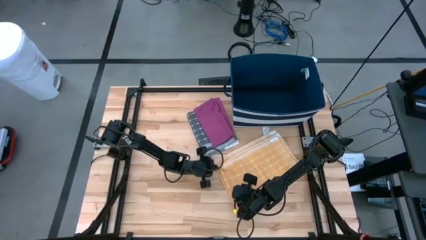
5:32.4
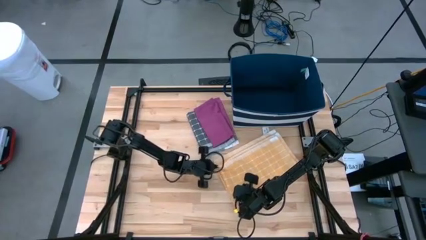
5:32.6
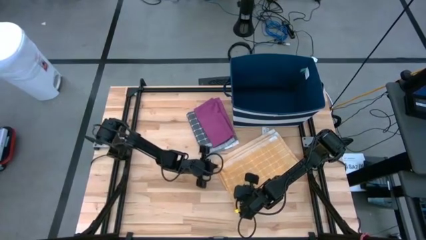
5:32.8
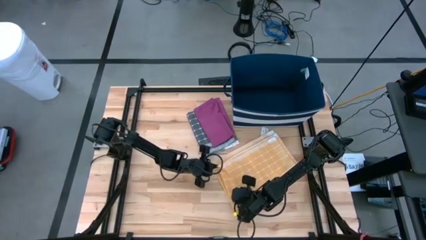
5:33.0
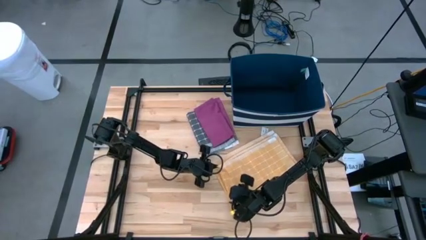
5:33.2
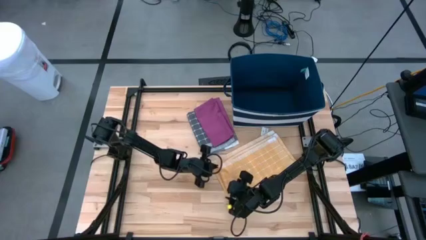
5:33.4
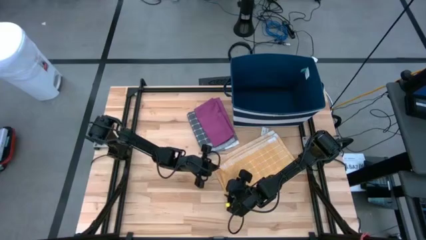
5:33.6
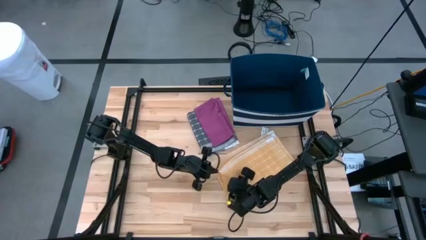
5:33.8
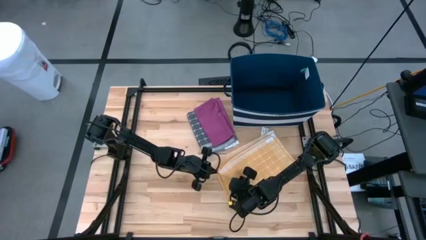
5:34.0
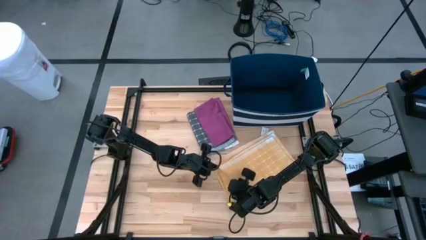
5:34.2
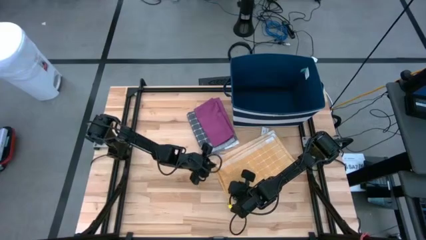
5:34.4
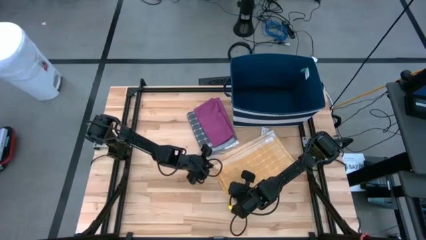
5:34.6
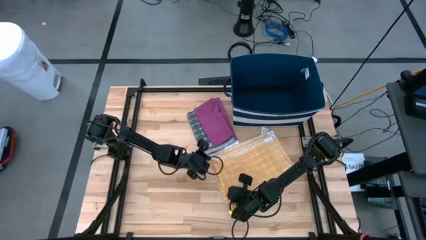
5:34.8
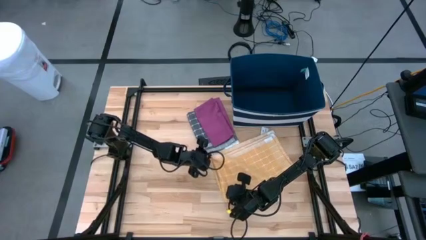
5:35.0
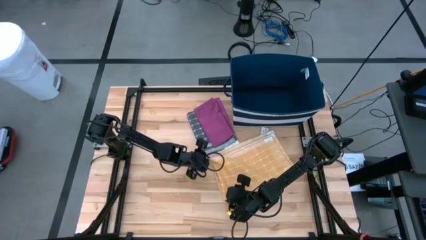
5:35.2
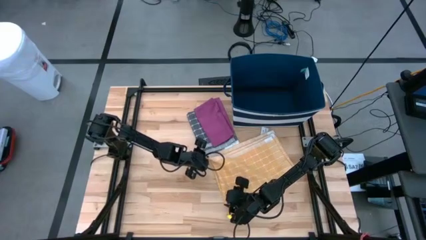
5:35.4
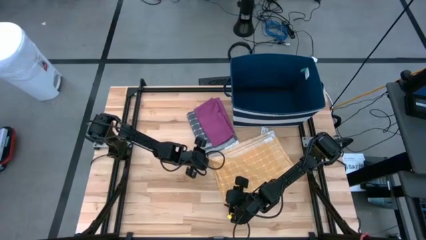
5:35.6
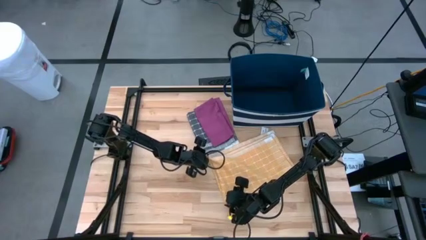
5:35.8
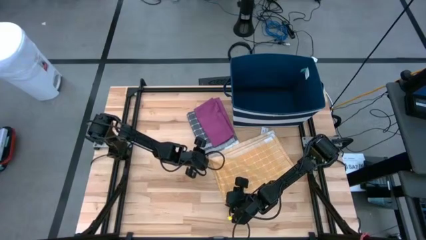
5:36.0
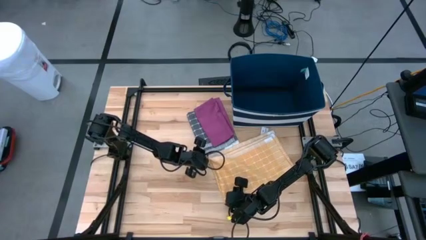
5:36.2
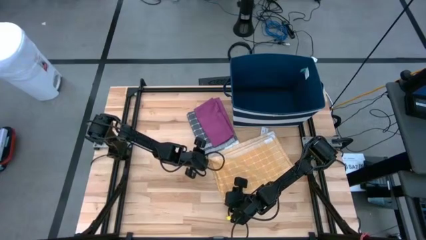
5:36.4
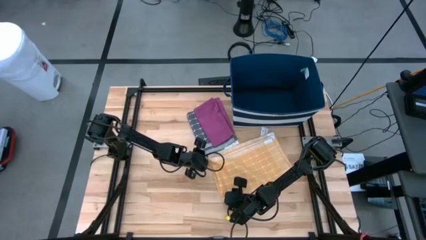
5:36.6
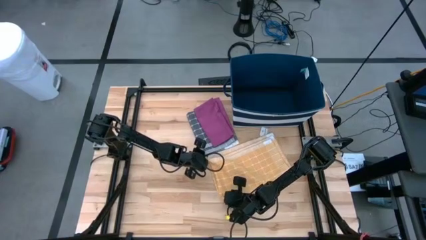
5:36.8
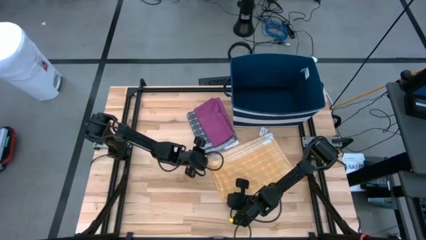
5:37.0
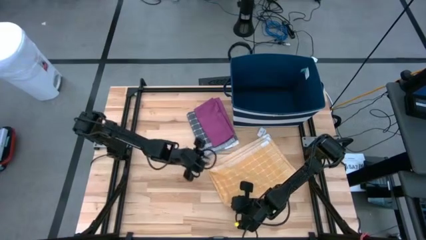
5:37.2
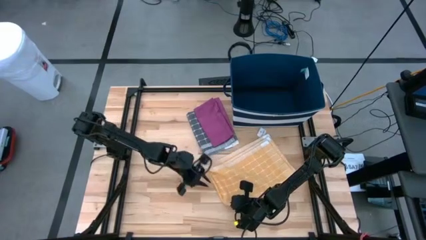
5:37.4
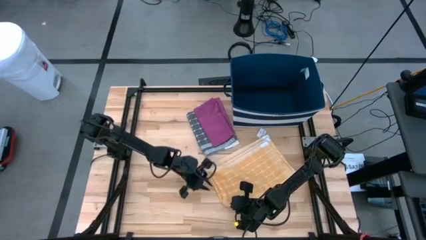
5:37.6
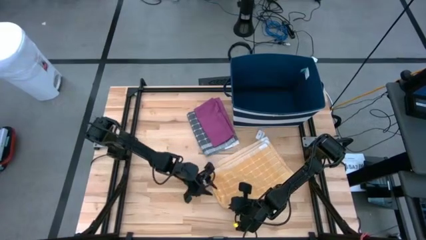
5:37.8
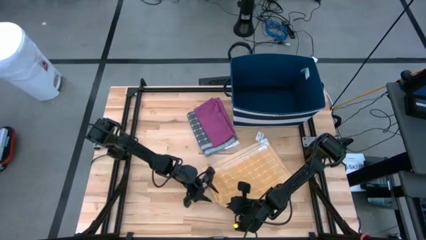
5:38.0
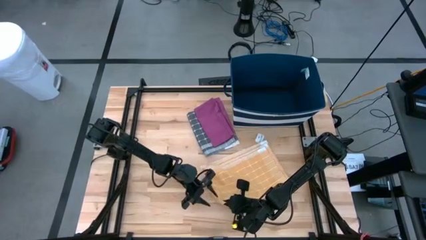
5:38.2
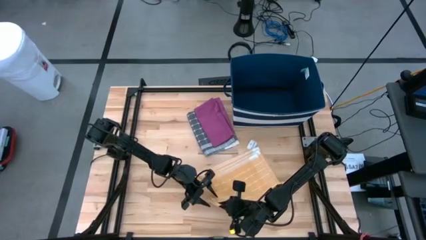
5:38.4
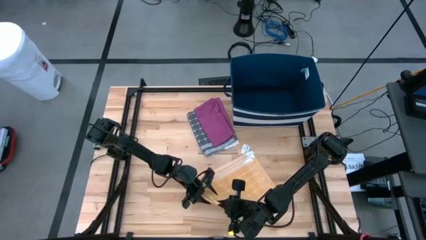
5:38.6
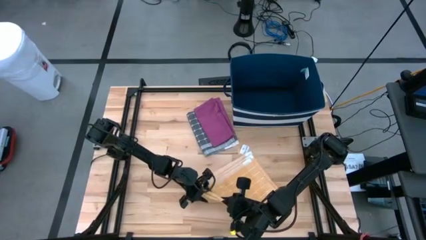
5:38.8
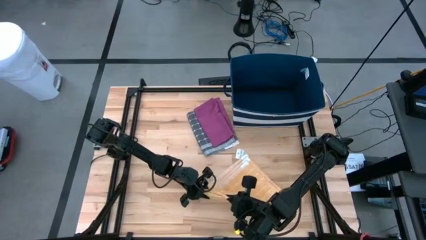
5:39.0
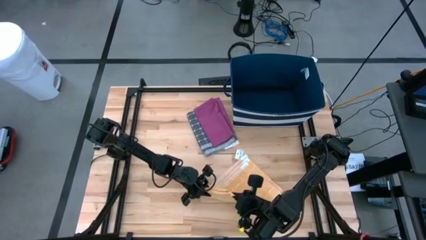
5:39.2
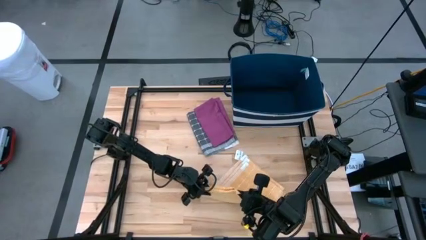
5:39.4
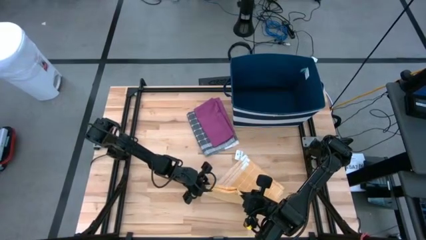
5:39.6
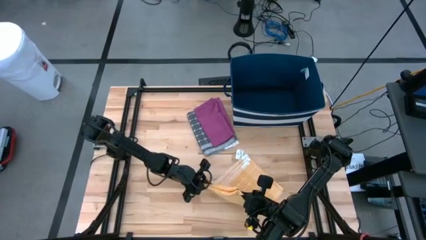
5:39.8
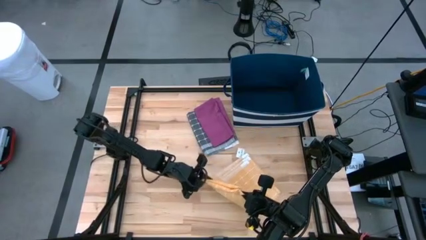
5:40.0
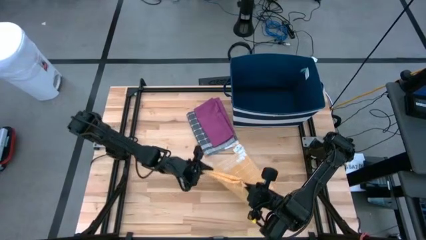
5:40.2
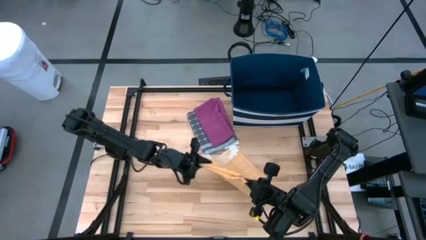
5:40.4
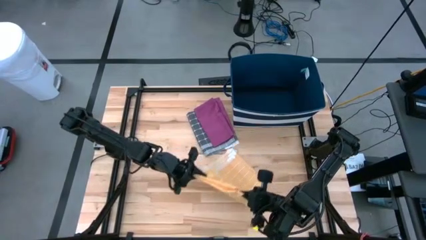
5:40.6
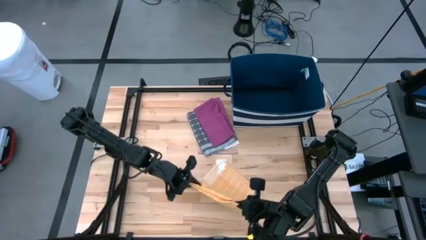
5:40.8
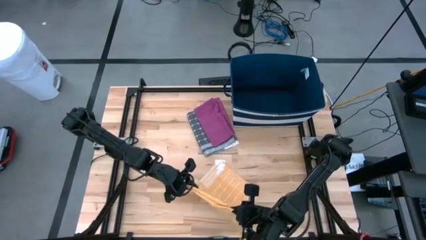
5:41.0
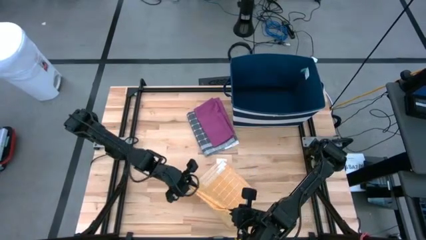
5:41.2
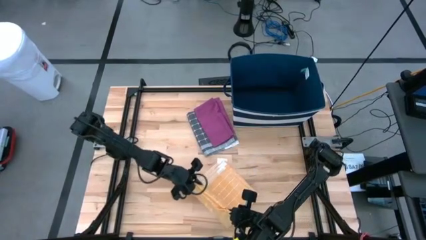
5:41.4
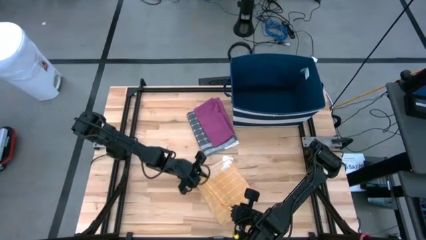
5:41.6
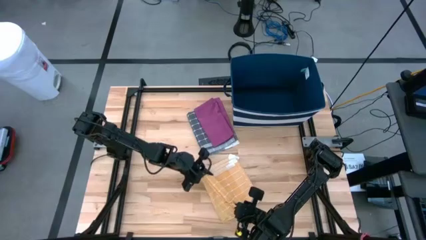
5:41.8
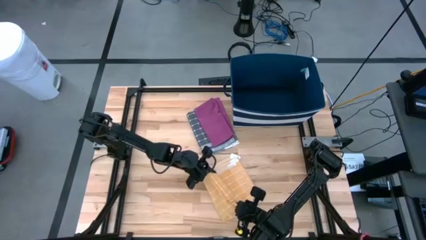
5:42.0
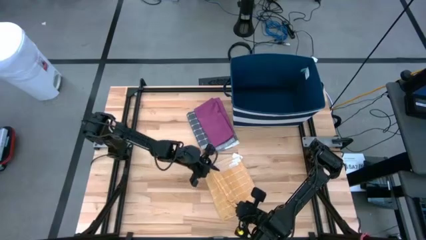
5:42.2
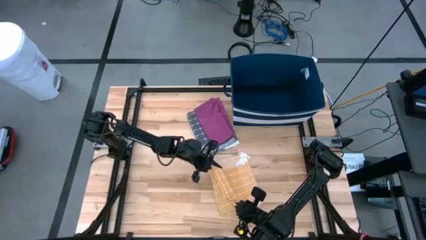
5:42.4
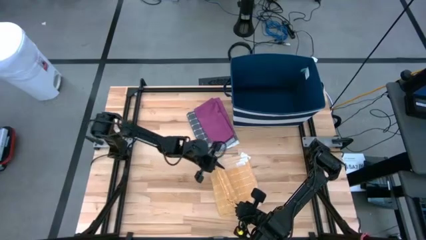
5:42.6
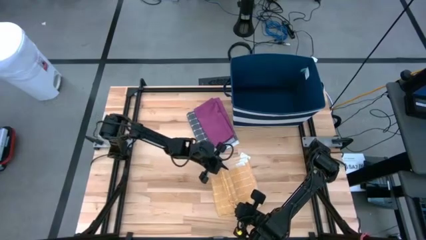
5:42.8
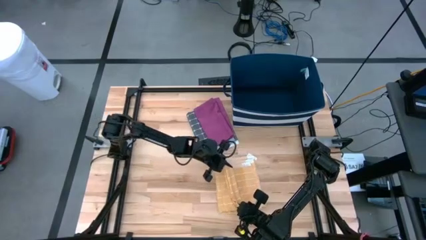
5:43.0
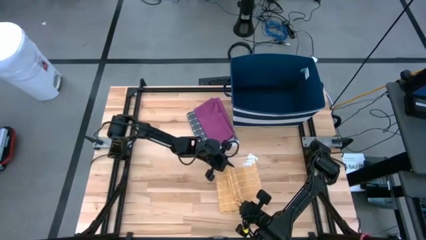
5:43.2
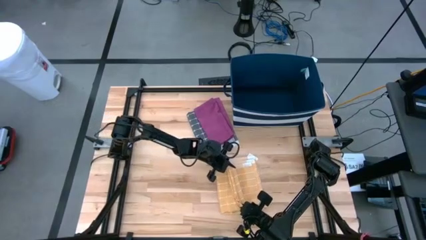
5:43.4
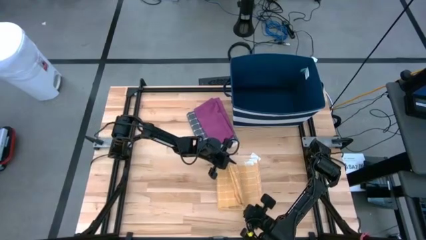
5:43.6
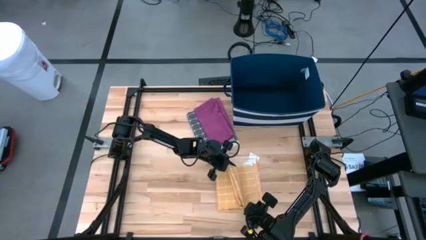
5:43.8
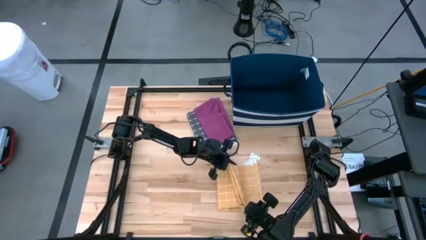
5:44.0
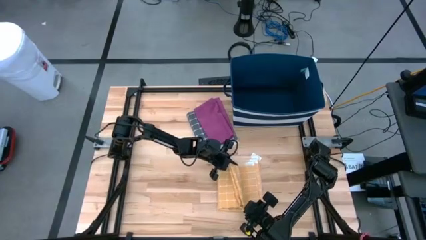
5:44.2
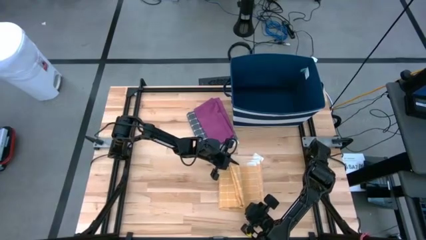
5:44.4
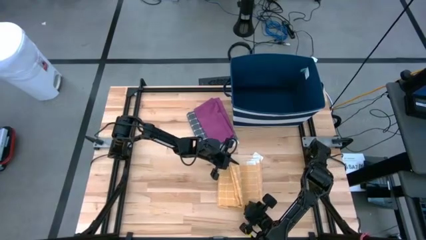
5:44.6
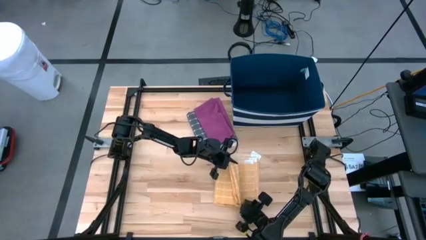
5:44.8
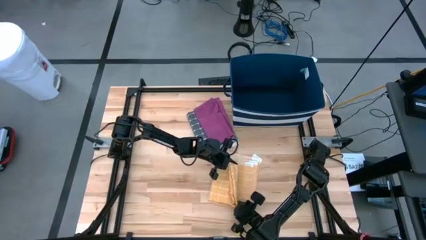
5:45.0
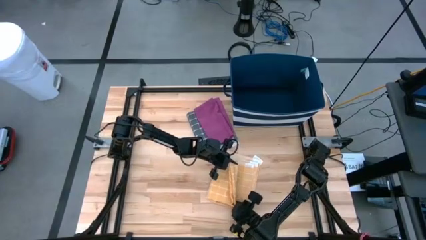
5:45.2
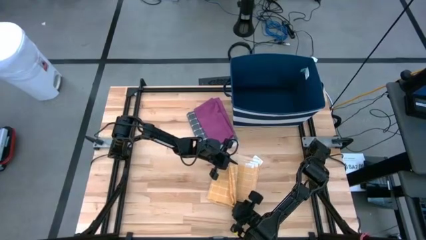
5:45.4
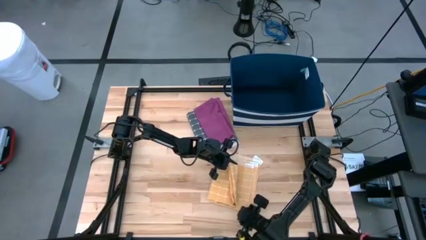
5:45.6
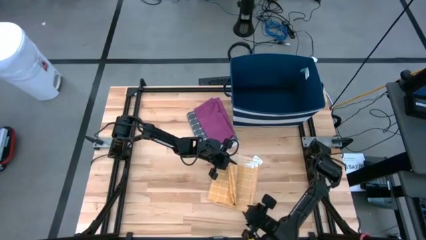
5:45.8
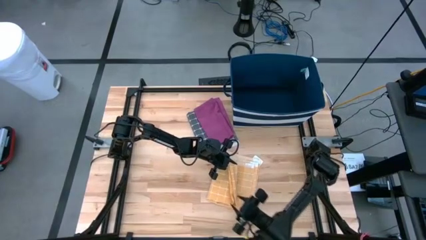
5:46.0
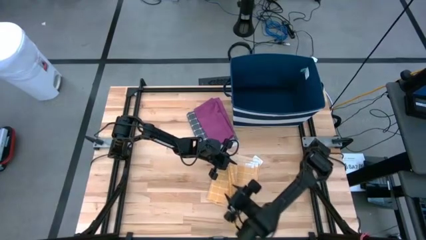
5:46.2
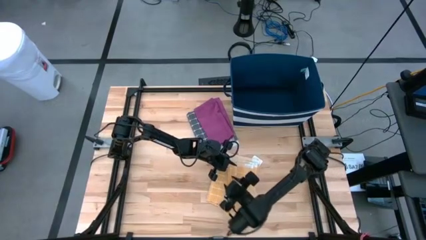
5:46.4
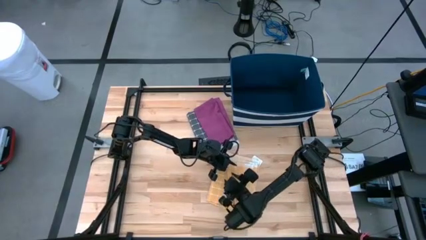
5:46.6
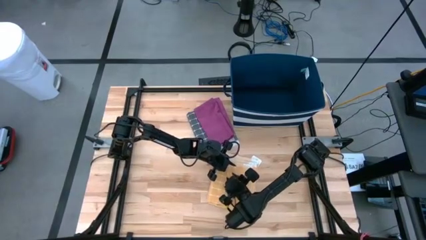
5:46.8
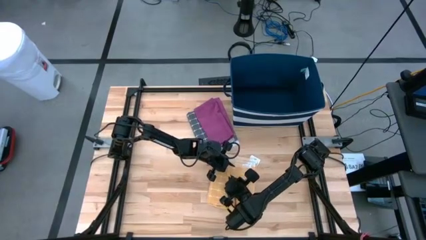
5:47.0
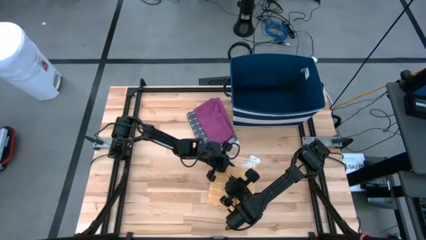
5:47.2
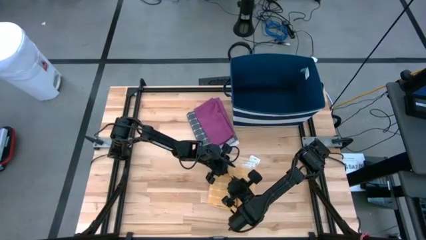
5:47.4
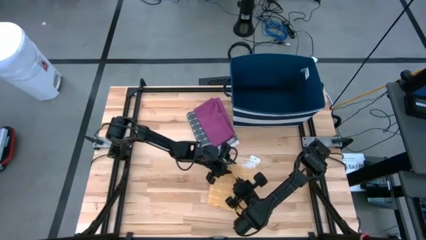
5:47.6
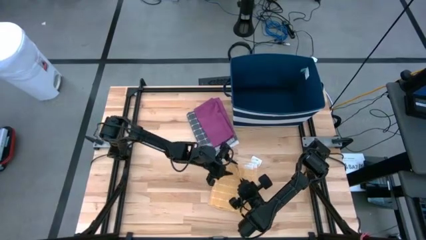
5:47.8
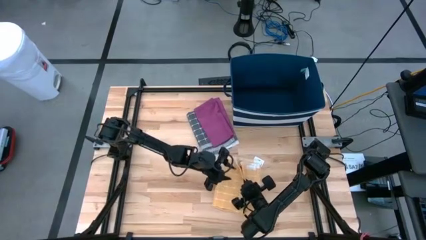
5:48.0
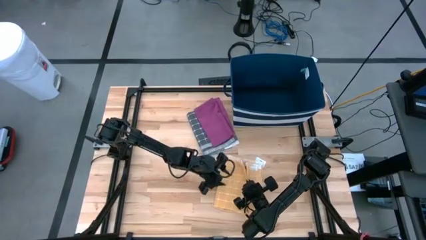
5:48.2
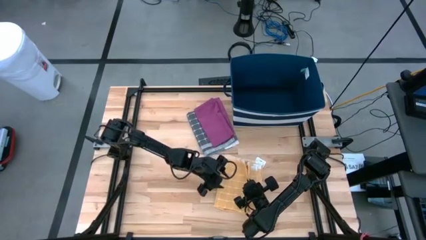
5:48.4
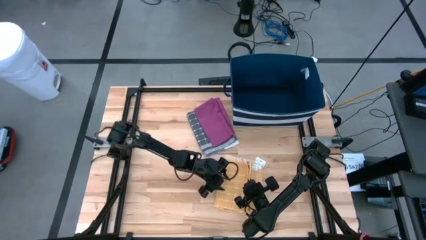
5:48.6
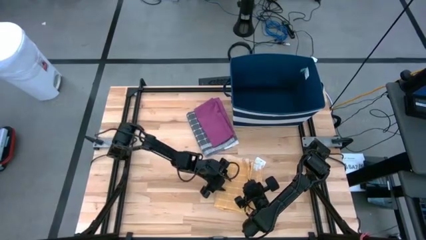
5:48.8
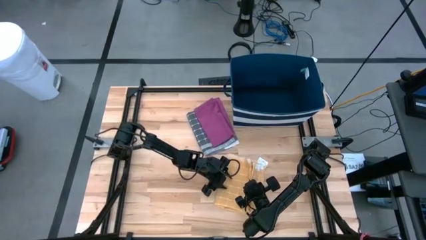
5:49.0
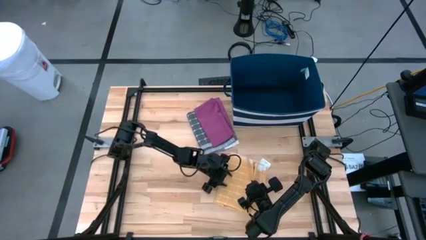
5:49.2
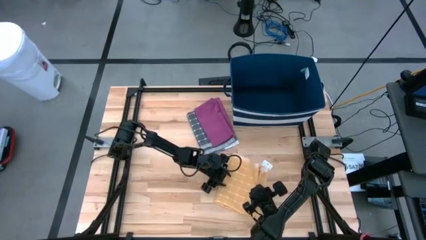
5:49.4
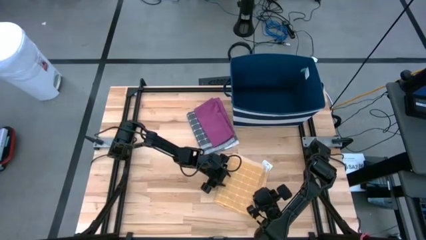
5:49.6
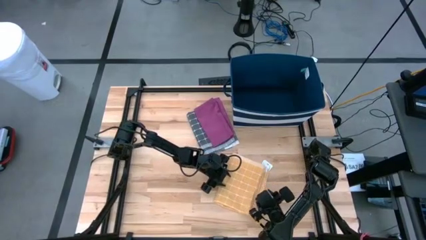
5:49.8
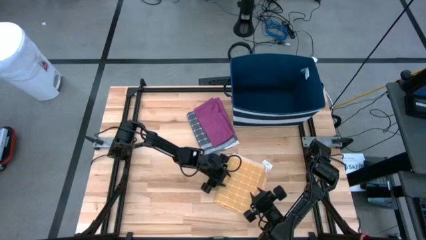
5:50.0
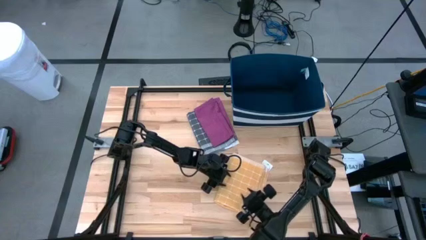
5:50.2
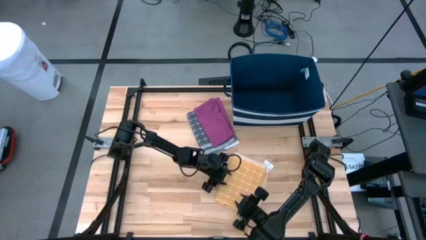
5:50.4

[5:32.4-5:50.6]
Task: Fold towel
Fold the orange checkered towel
